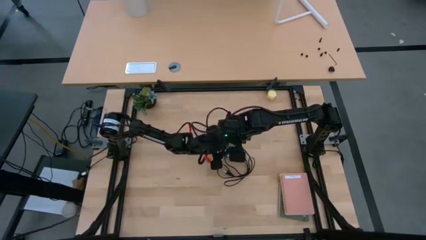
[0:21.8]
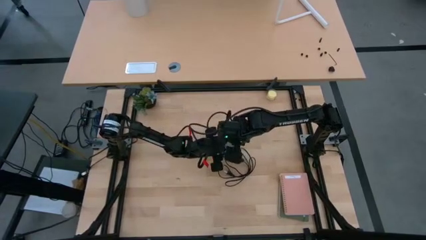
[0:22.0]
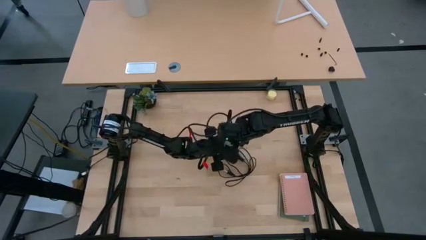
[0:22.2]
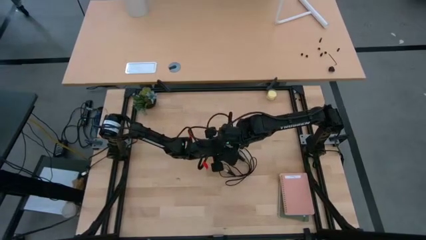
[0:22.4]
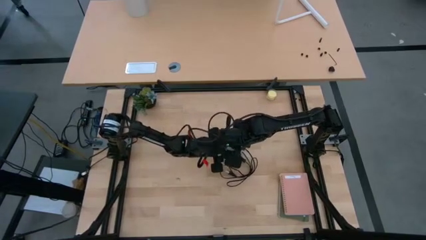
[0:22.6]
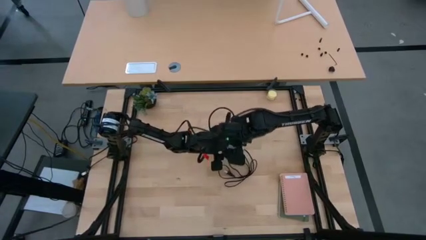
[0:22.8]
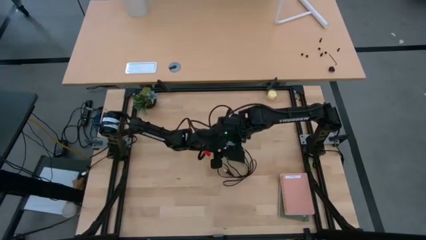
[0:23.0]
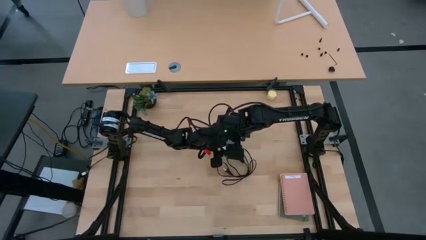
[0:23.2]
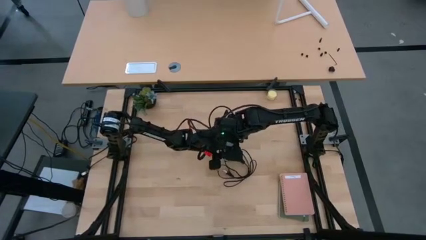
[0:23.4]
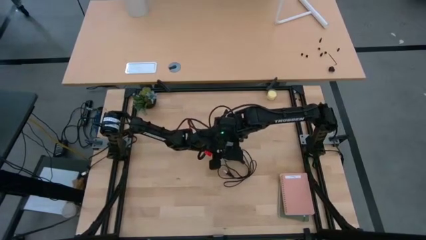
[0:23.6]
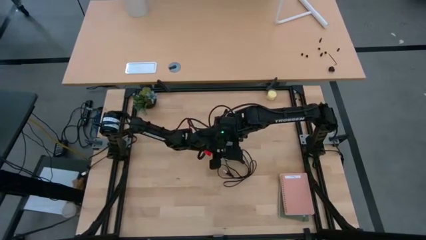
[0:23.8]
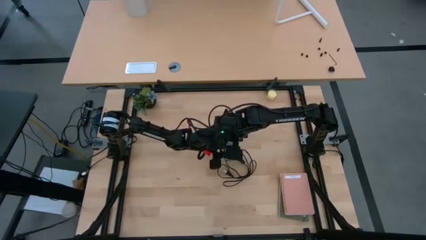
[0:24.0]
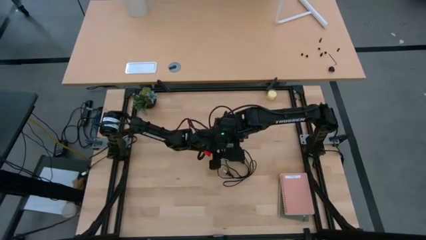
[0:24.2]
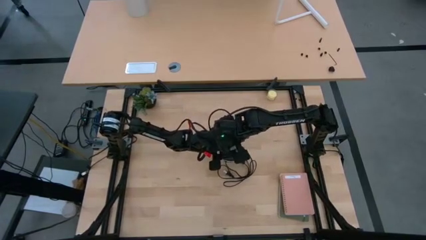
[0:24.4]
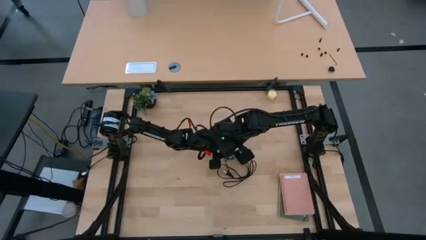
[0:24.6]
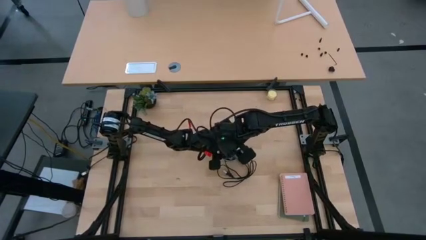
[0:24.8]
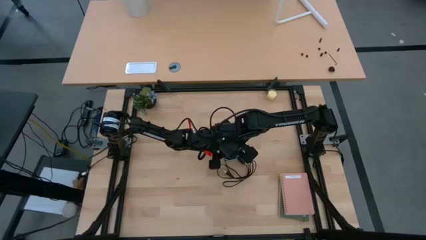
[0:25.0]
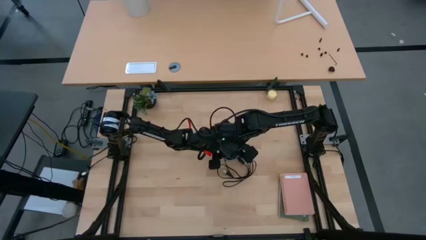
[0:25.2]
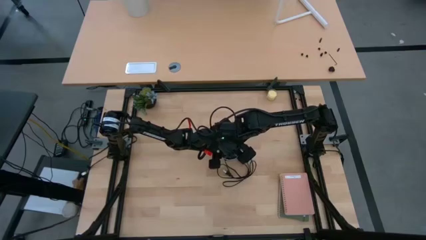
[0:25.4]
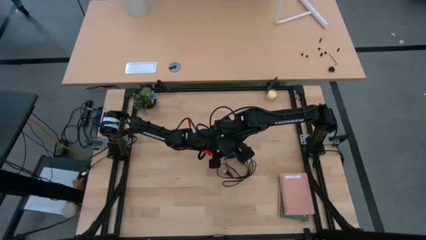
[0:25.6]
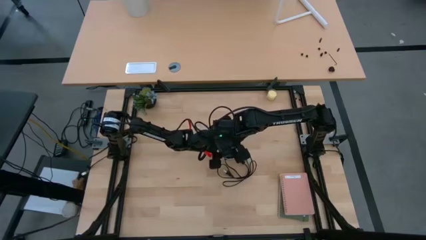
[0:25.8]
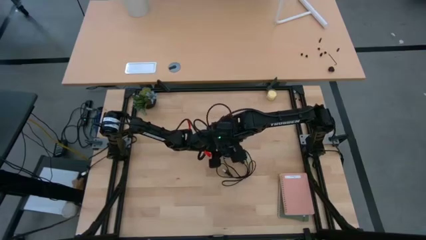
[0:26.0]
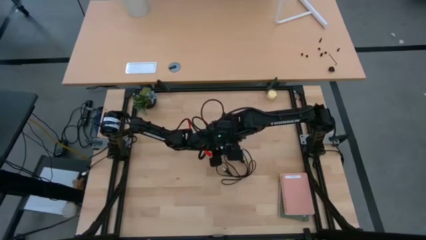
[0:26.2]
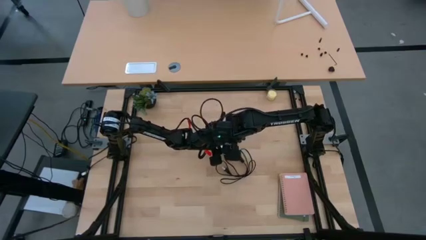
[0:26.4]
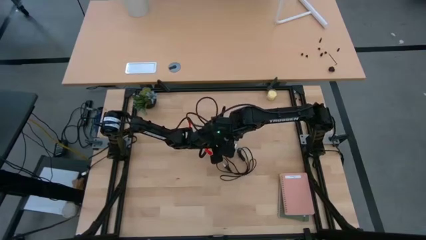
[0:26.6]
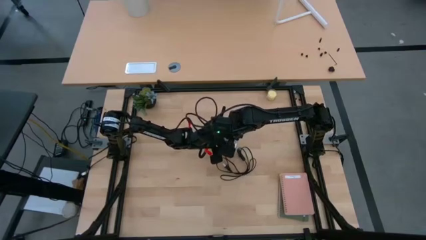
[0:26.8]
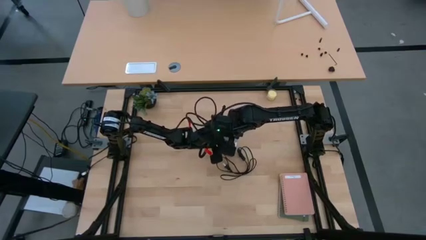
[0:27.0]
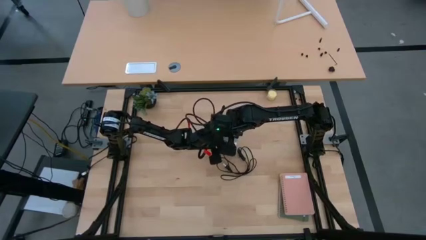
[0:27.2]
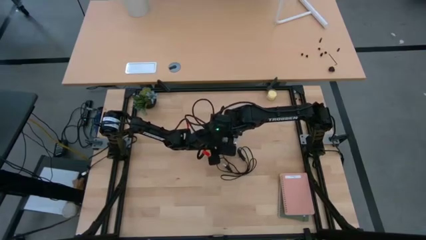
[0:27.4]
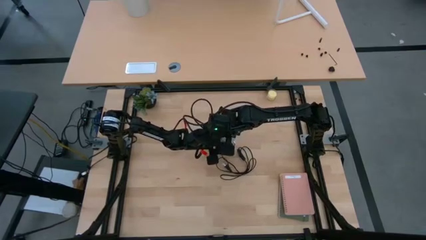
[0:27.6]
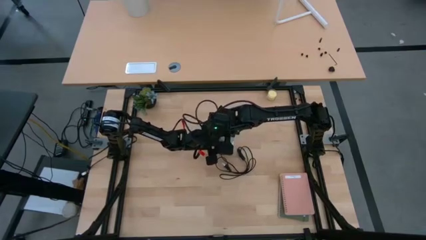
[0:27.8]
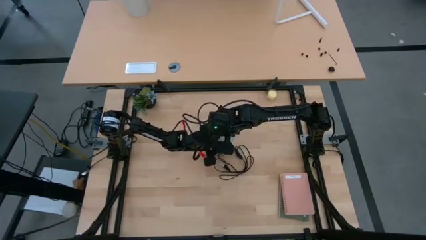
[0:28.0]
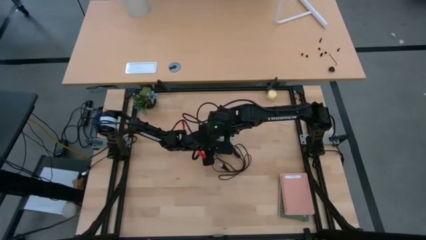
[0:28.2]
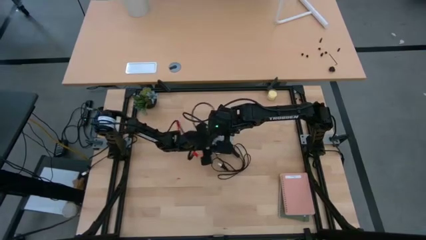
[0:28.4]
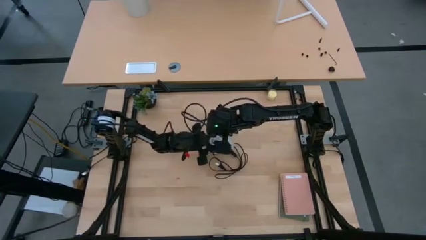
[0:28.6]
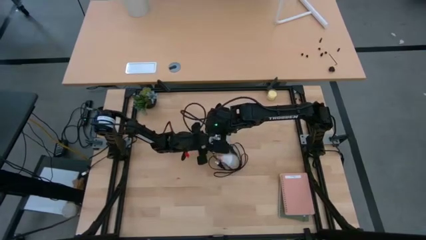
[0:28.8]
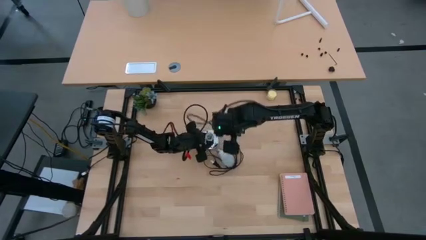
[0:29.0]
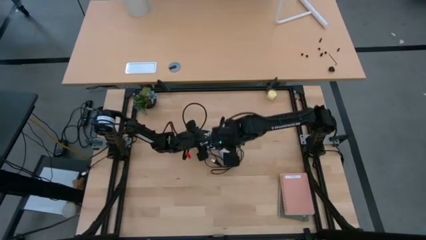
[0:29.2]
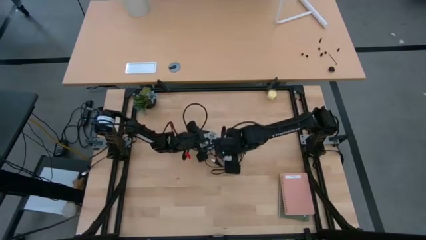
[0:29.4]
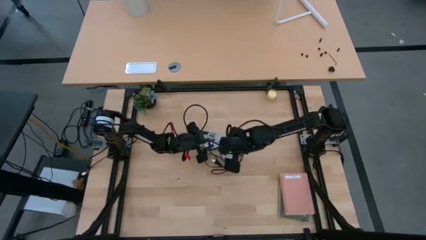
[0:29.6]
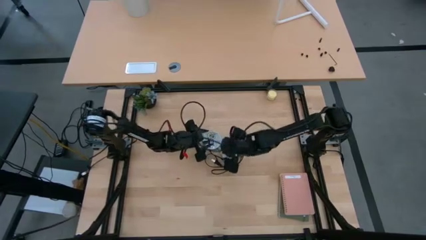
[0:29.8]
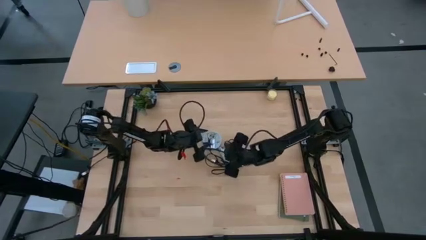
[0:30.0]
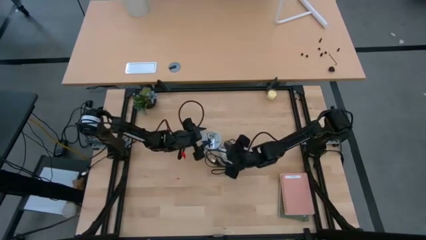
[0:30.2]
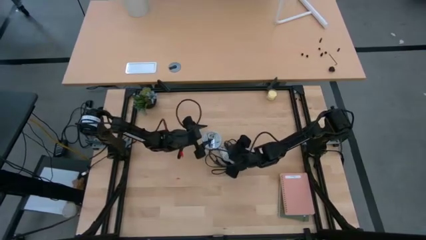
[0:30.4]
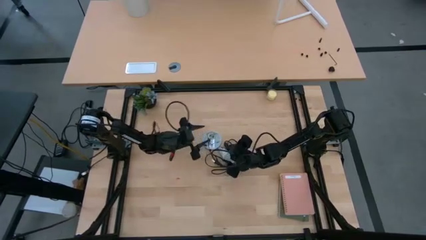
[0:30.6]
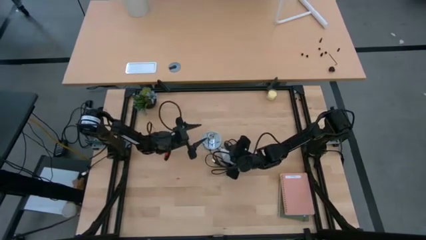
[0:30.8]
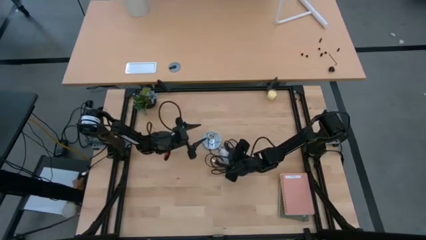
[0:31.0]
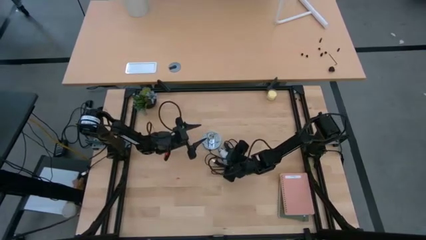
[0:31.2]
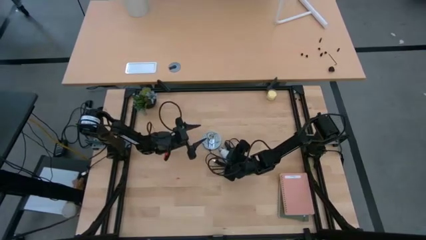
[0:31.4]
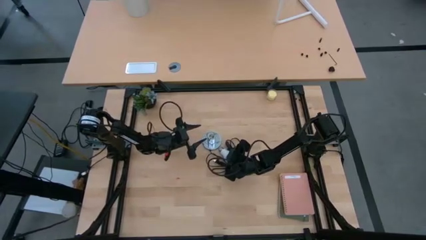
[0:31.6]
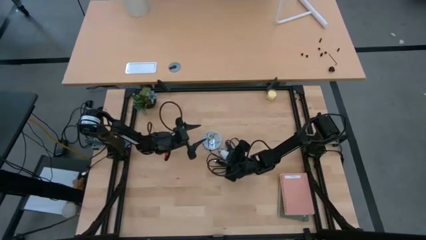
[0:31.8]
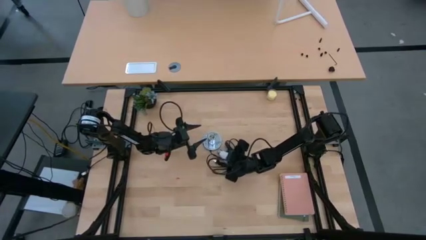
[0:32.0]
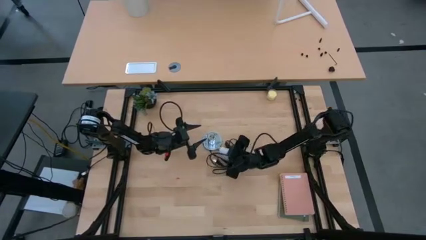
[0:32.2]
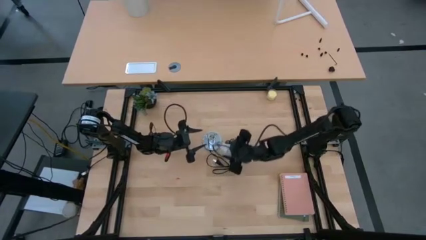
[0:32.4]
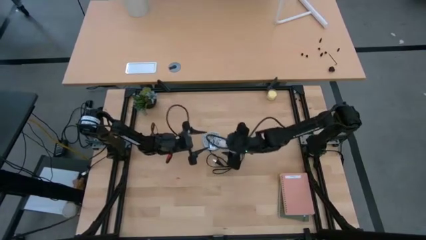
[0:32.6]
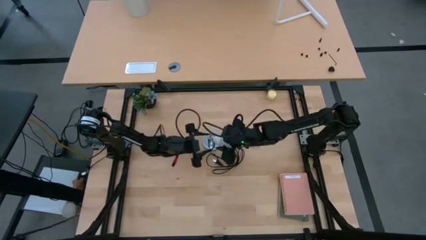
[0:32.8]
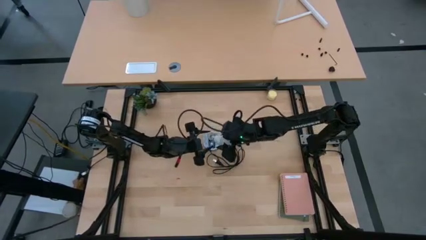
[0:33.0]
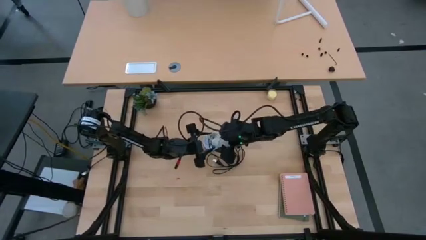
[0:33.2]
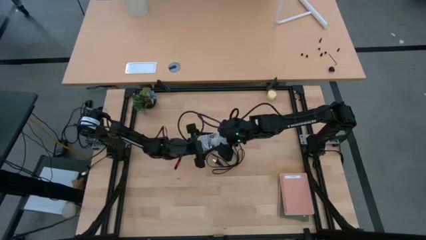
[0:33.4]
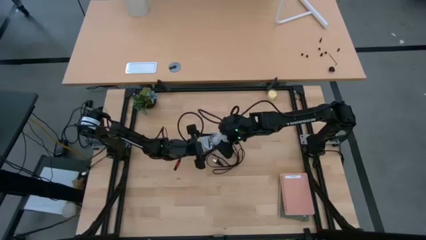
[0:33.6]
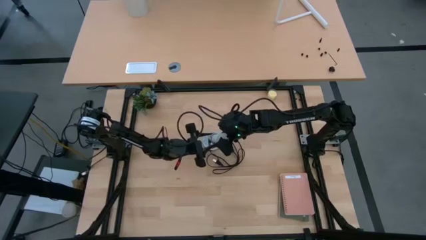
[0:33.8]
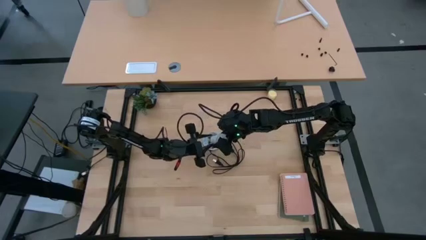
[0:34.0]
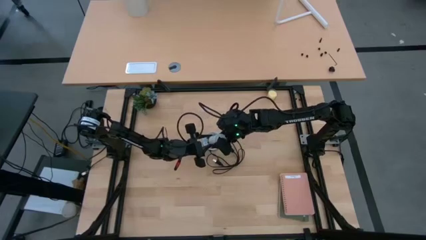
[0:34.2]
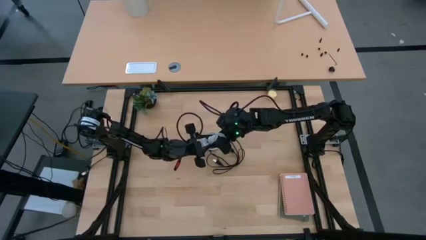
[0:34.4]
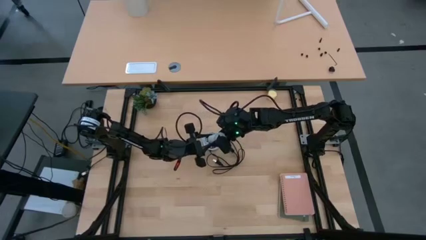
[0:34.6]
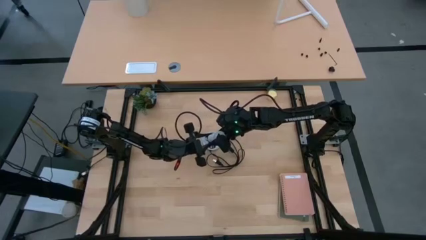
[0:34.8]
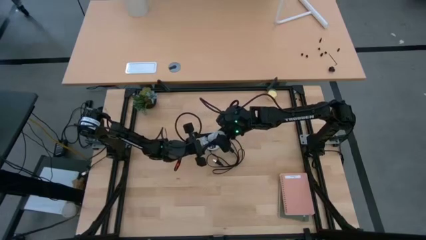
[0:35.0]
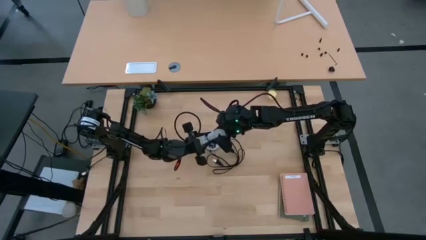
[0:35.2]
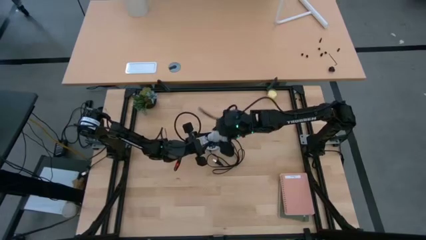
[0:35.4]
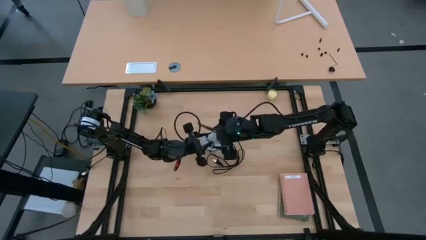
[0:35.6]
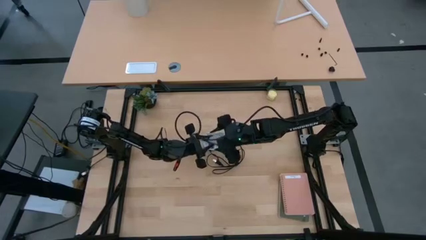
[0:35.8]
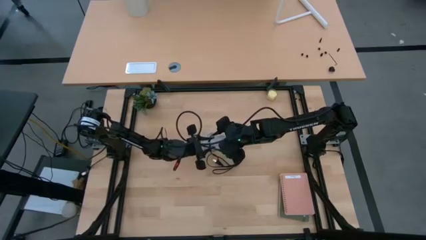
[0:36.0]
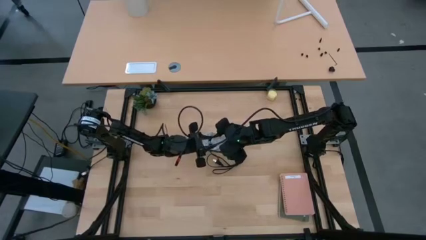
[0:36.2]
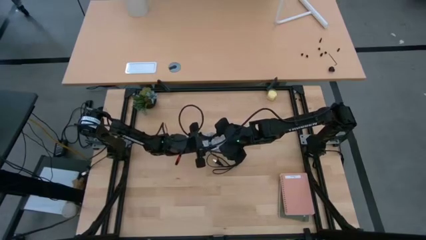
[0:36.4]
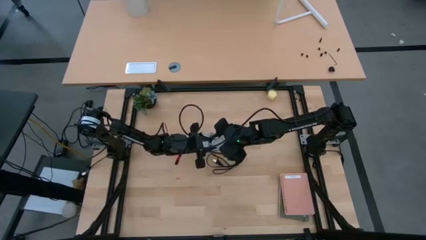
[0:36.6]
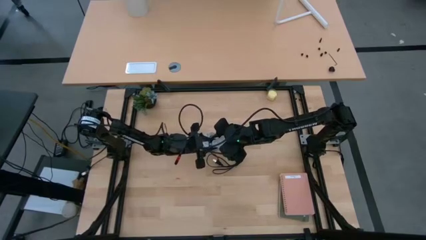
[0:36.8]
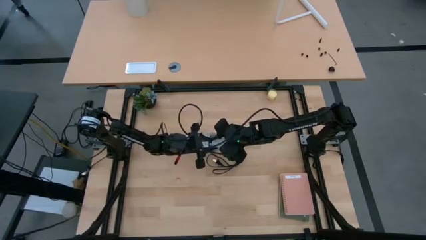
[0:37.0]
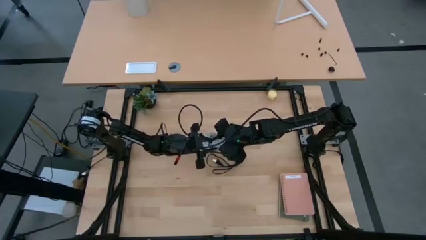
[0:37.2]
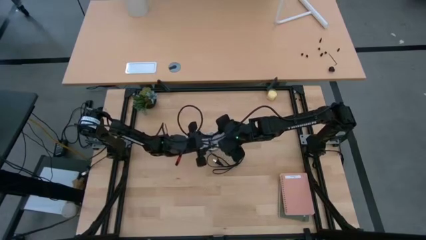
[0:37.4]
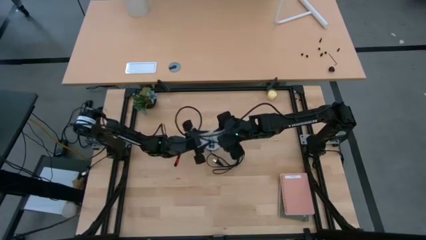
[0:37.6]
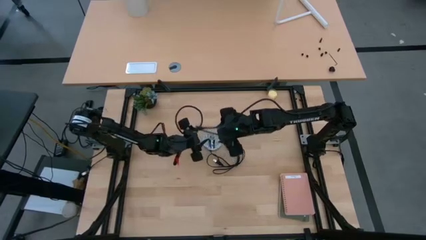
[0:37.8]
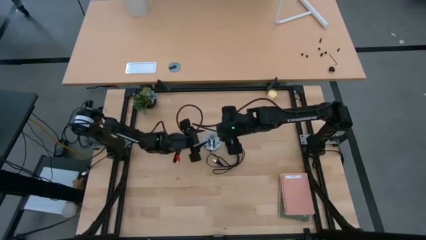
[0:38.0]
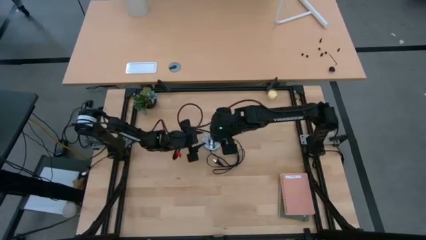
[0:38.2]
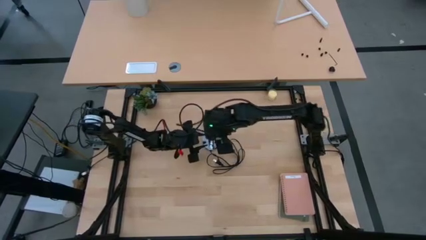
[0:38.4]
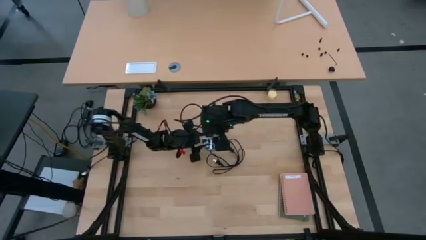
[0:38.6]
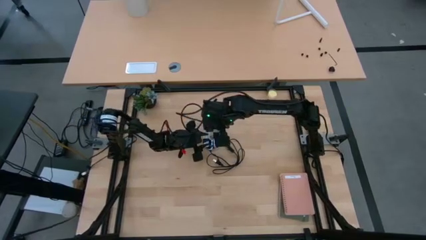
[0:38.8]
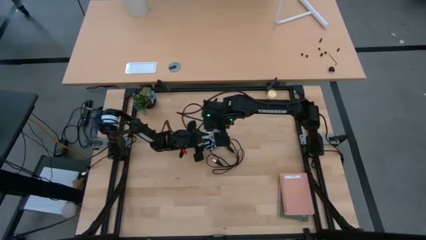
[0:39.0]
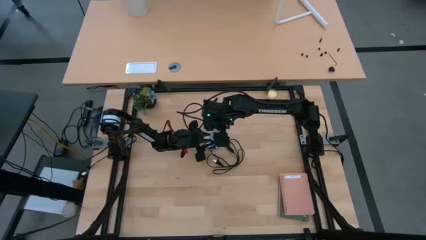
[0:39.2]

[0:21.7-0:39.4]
Task: Screw lightbulb
Insert the lightbulb into the lamp
